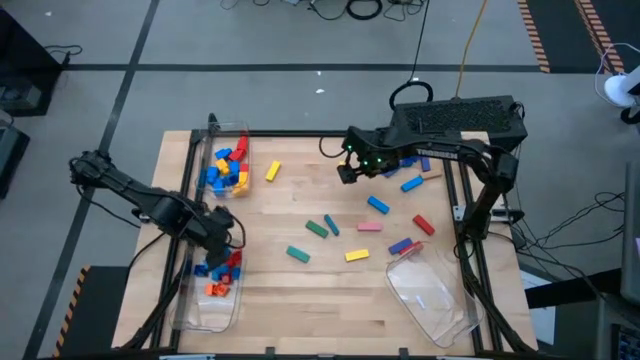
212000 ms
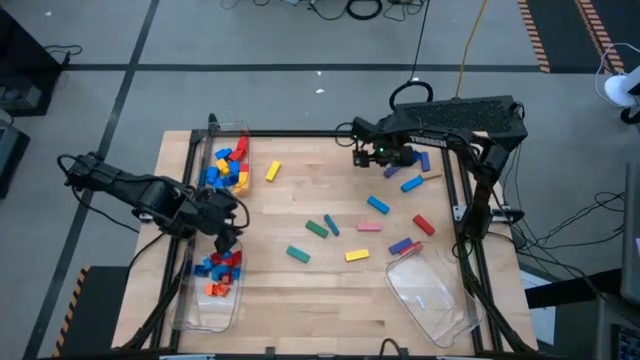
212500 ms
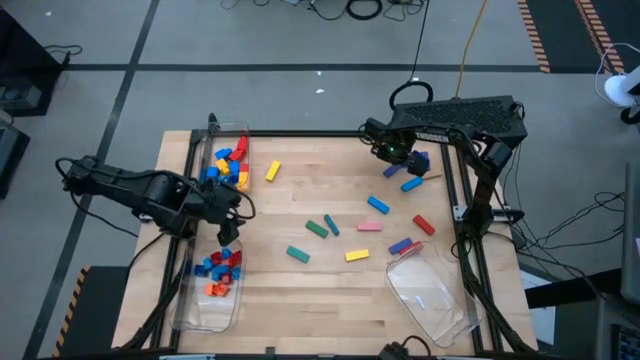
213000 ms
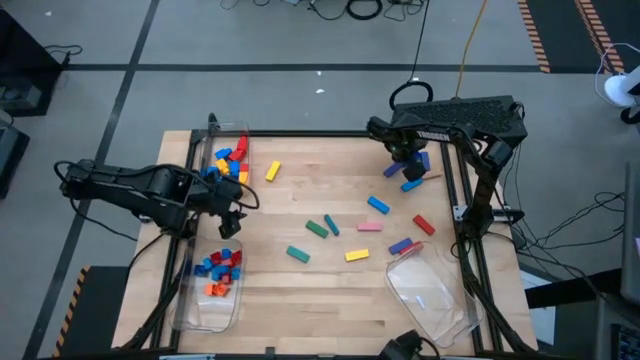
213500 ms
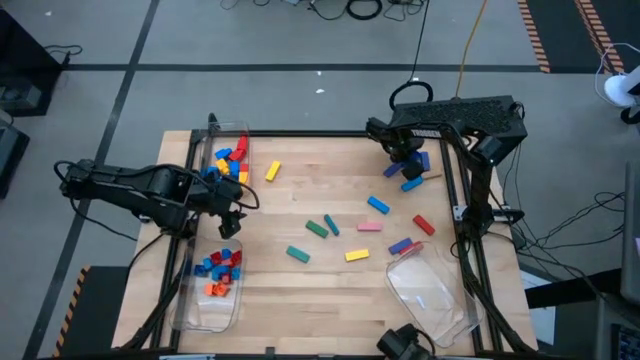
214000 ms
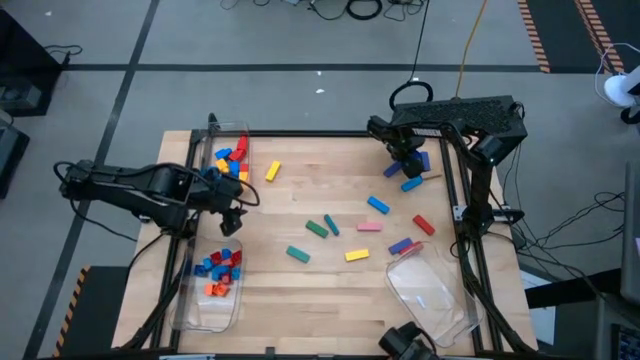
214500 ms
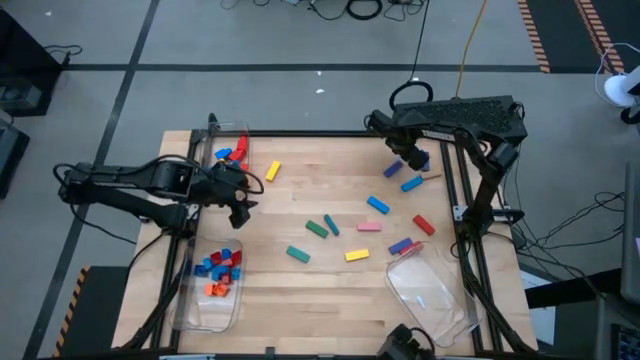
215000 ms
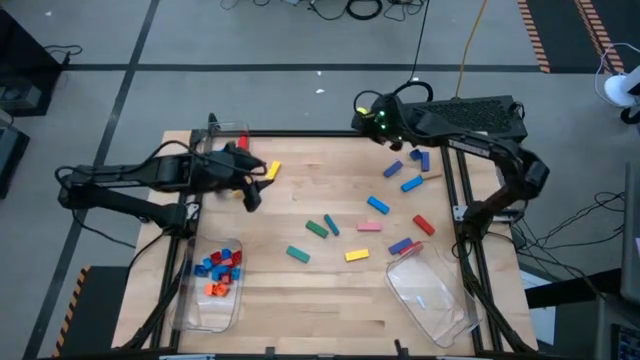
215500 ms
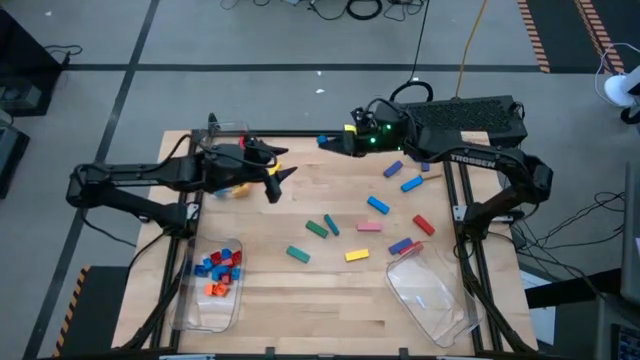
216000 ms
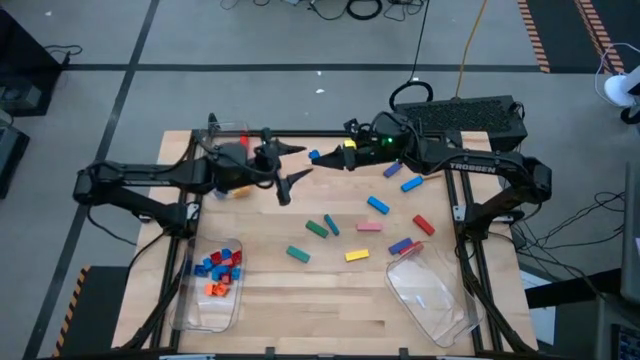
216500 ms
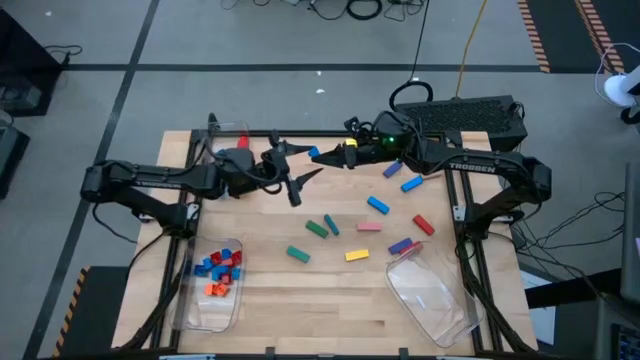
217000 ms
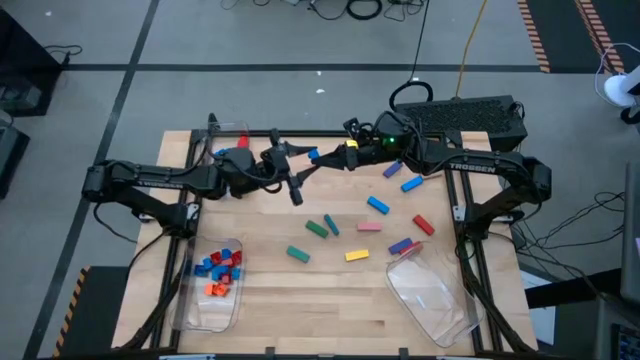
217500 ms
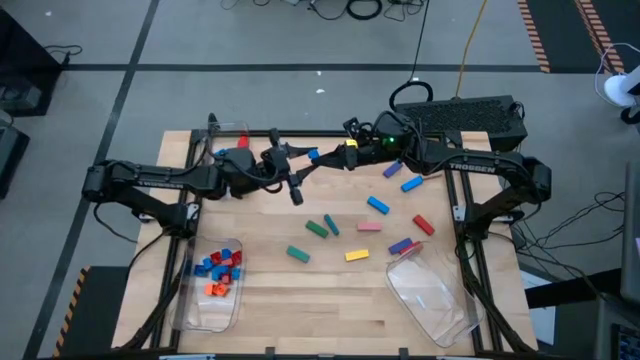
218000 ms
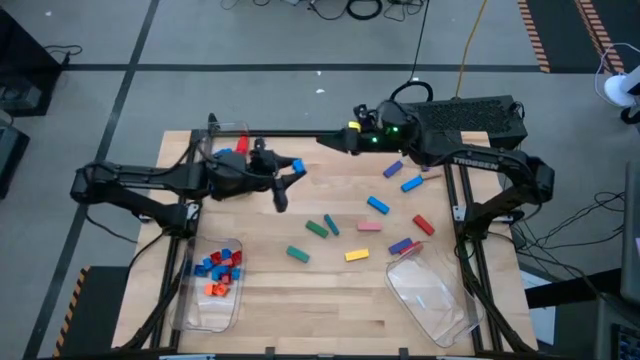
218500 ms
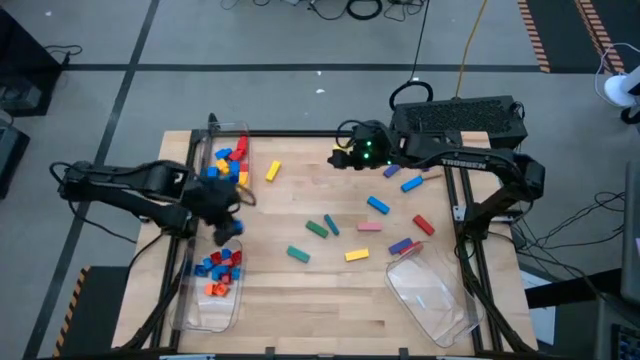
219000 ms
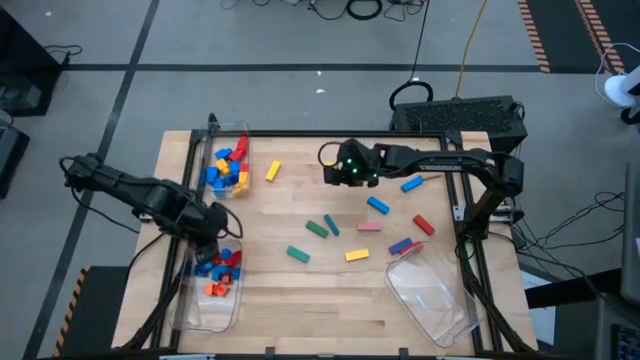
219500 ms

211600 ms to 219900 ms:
Task: Sort blocks by size
Put the blue four stud game piece into the bottom left transparent bin

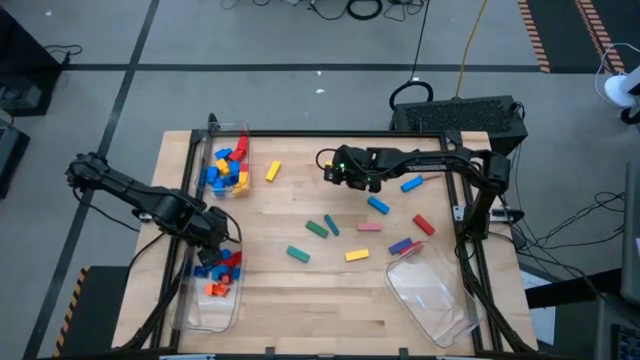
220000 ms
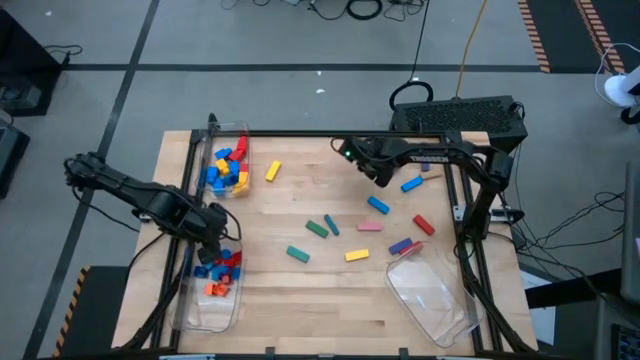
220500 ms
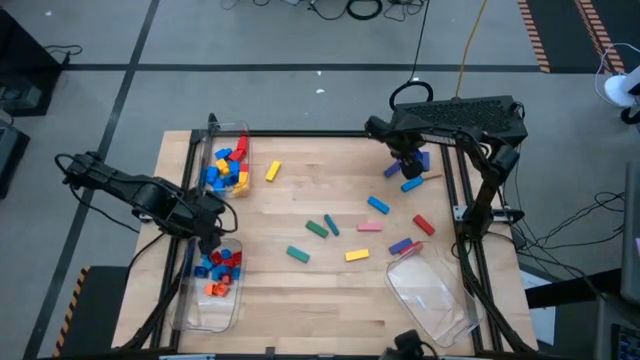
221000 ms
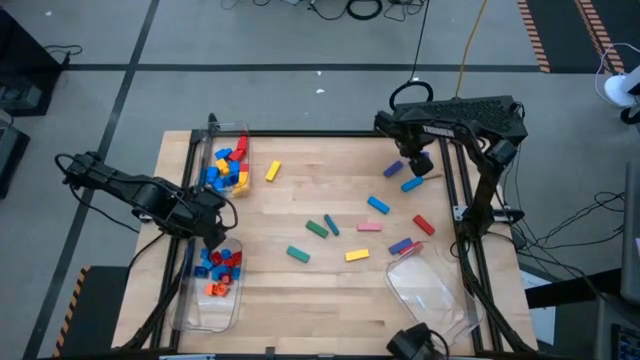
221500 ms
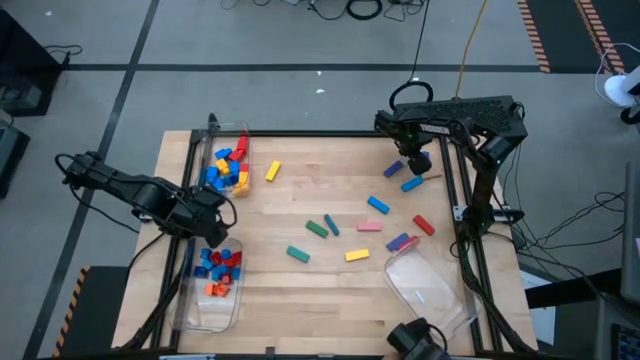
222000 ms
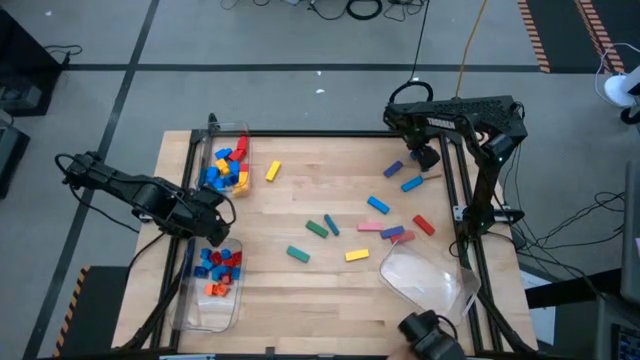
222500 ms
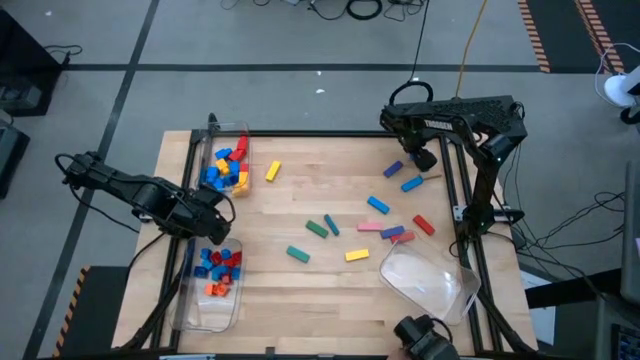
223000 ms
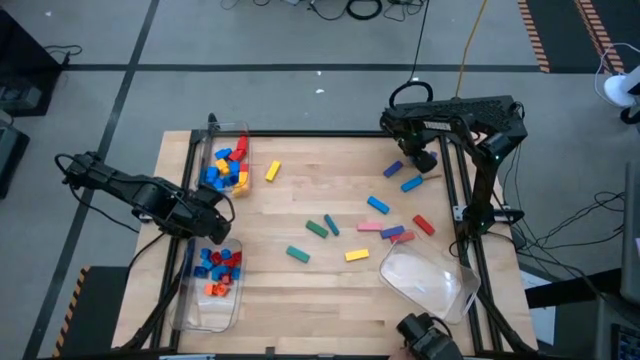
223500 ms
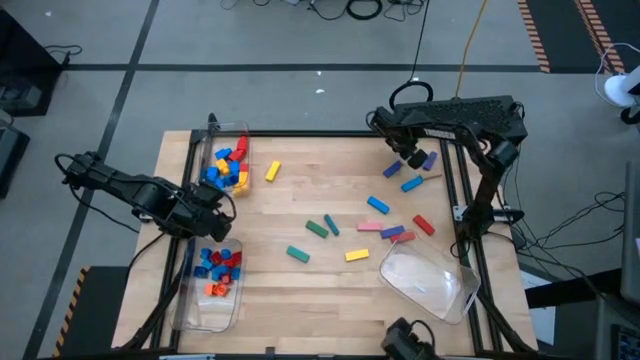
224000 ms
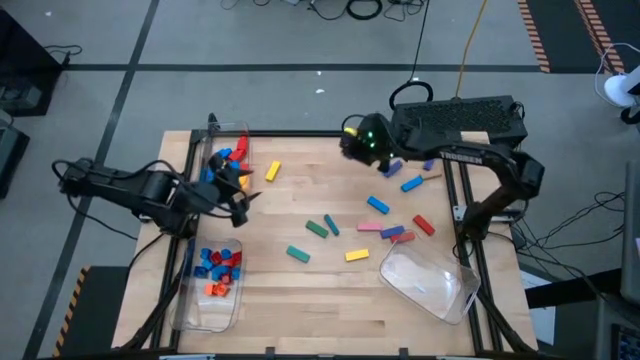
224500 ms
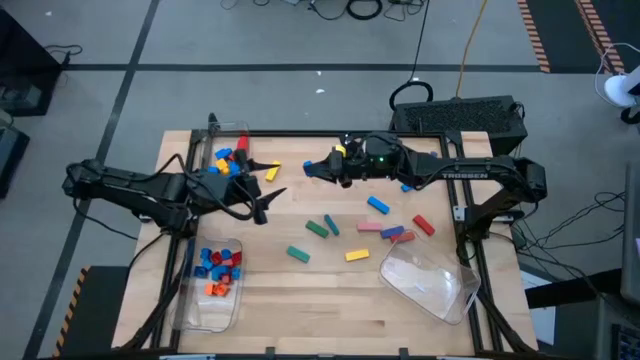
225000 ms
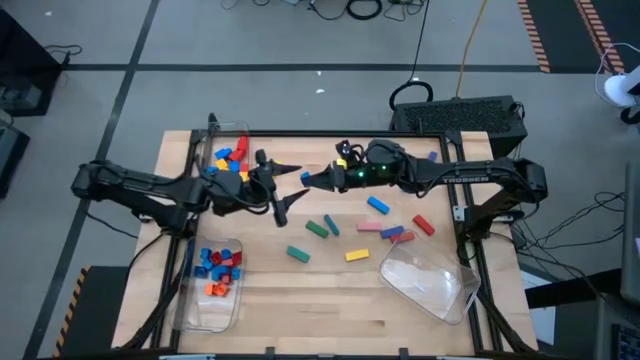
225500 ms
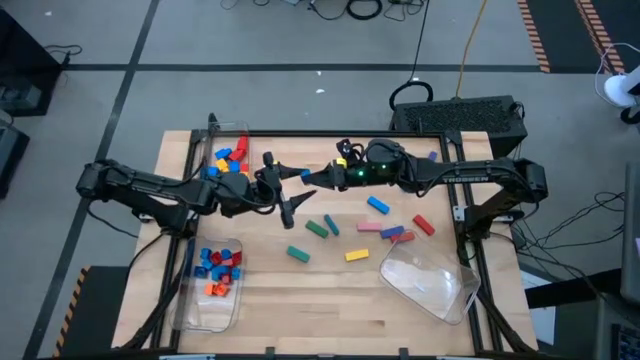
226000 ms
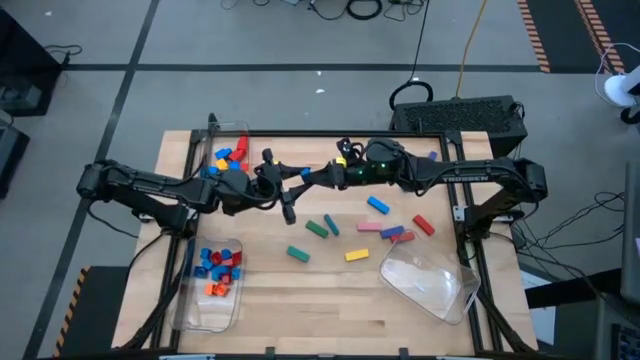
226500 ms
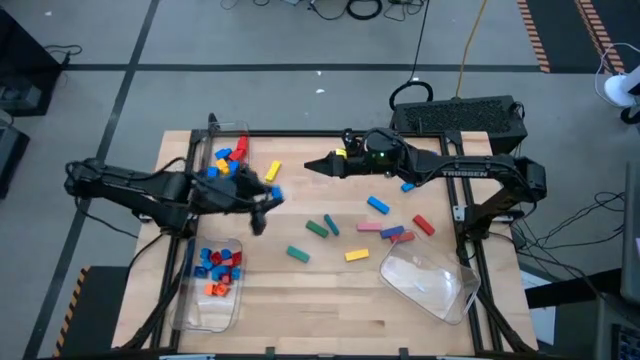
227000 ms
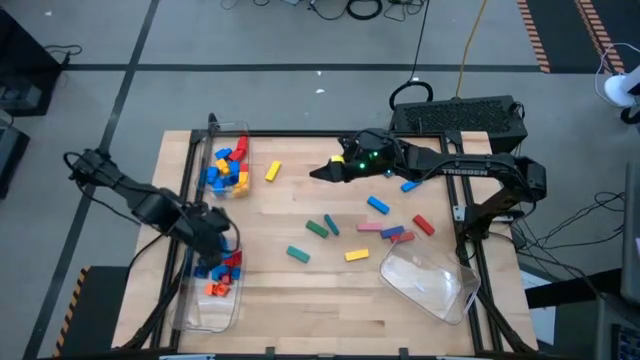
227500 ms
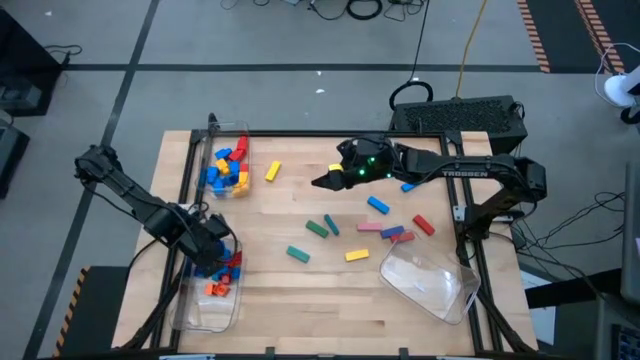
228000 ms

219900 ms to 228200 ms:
Put the blue four stud game piece into the bottom left transparent bin

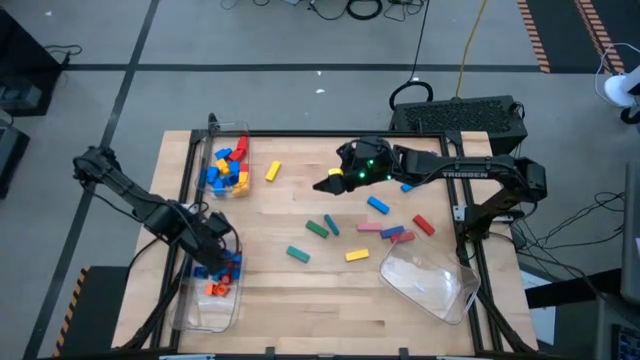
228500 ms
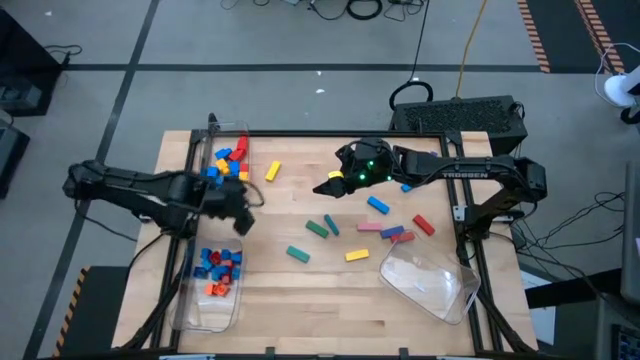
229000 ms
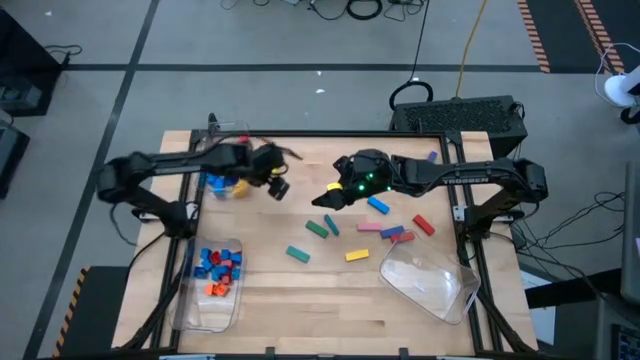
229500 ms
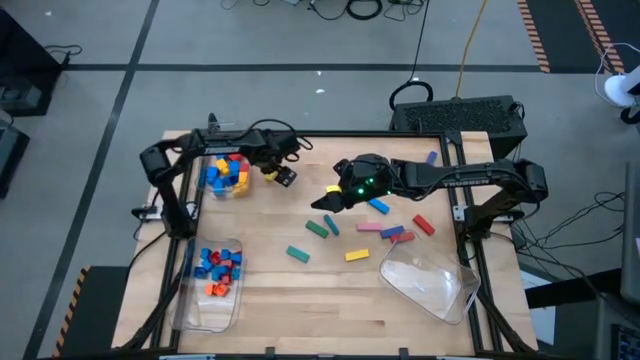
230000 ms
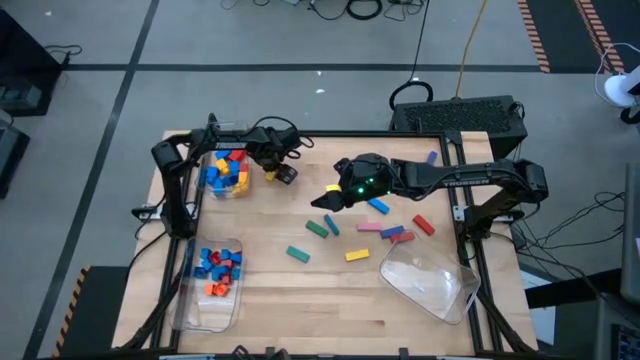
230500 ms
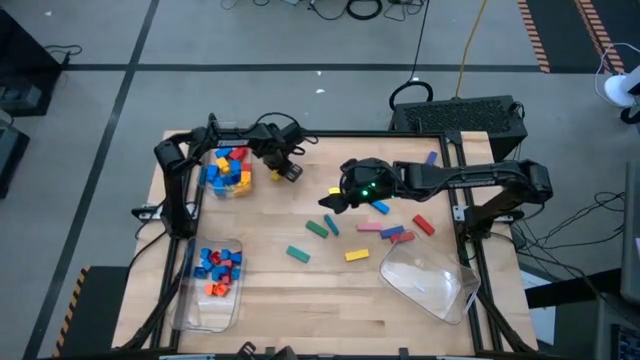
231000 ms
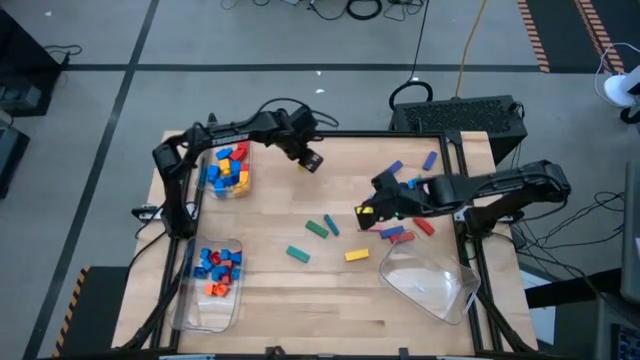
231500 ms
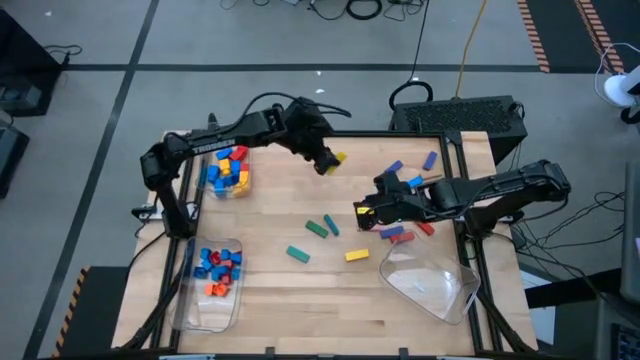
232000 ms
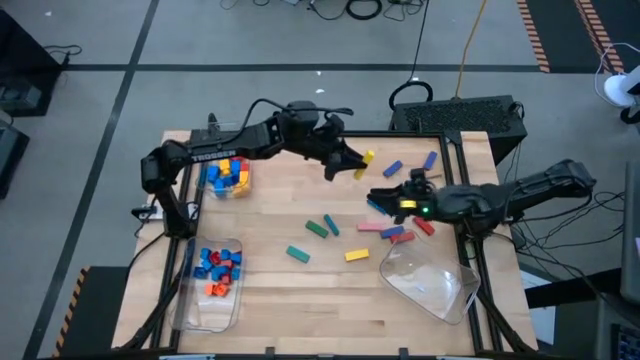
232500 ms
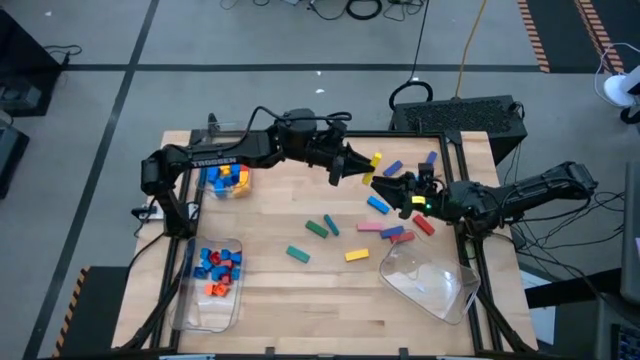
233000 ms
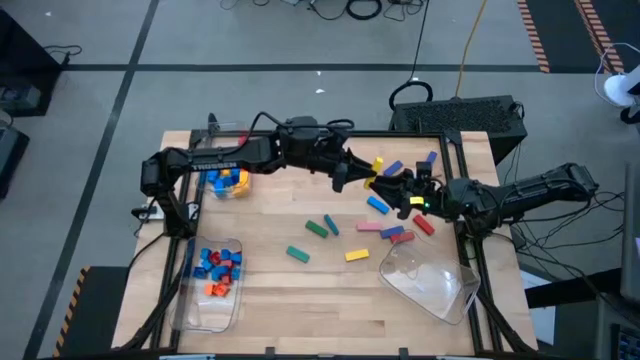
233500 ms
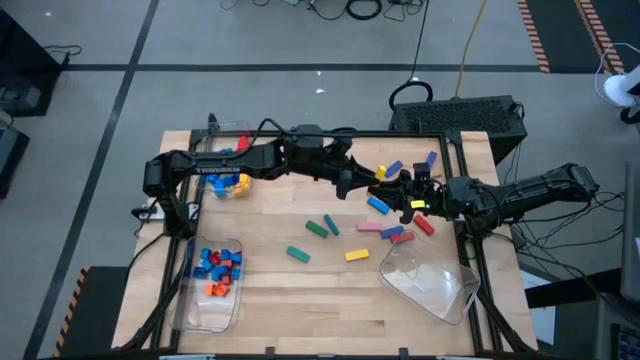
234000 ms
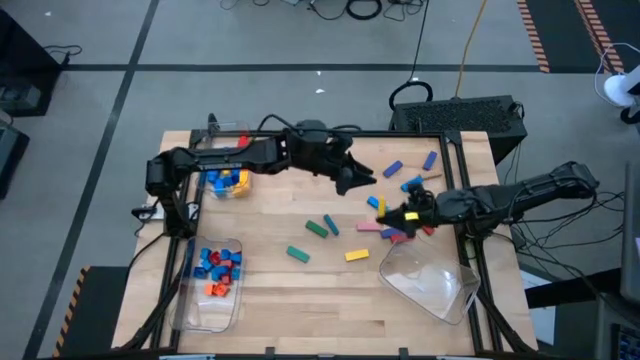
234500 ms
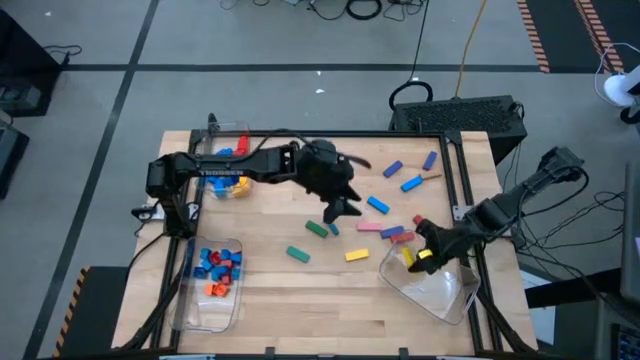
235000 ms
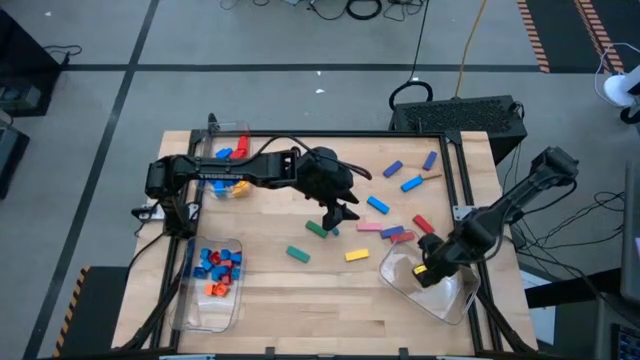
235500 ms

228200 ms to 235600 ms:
Put the yellow rectangular block into the bottom right transparent bin
